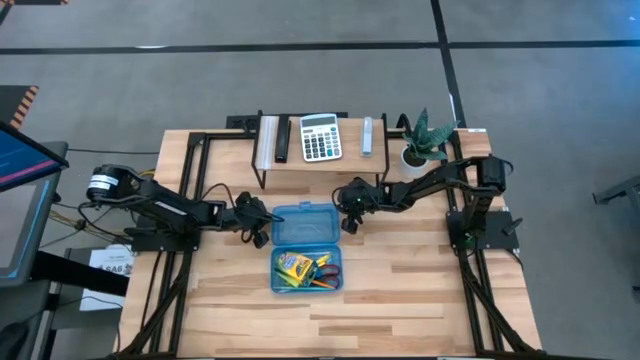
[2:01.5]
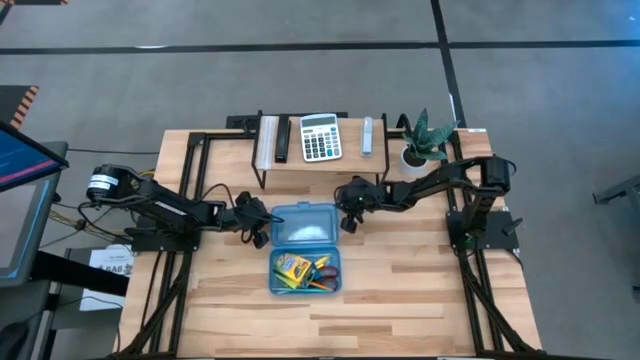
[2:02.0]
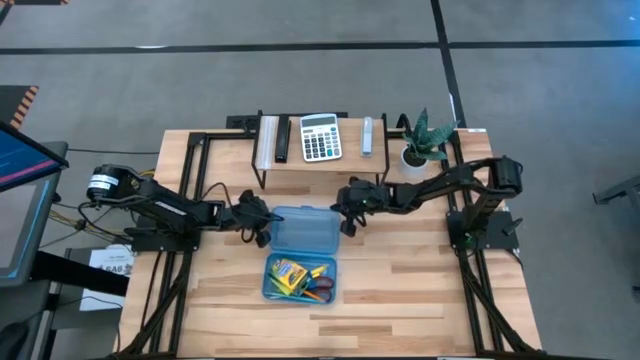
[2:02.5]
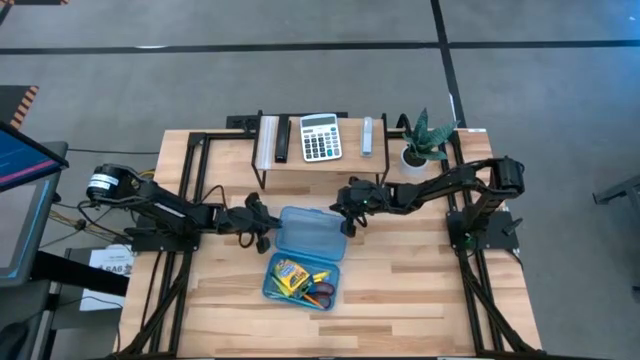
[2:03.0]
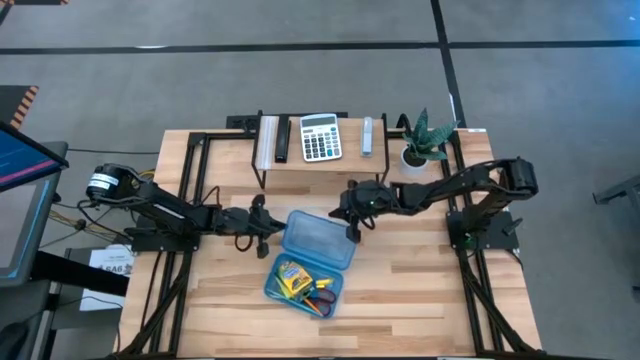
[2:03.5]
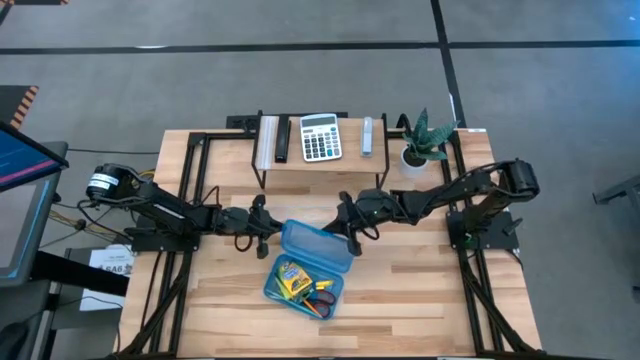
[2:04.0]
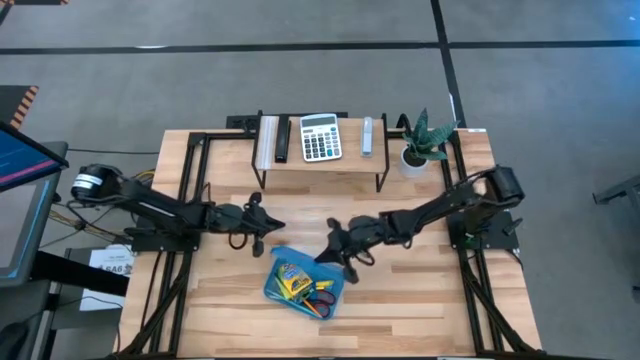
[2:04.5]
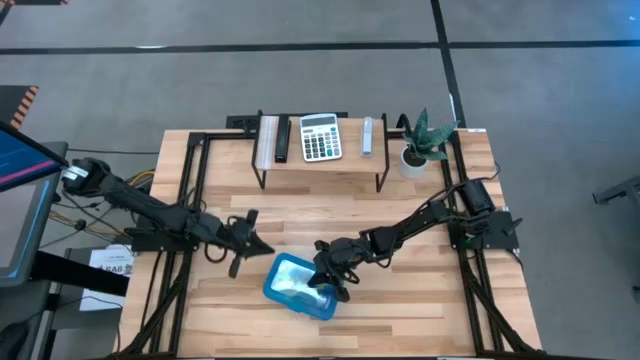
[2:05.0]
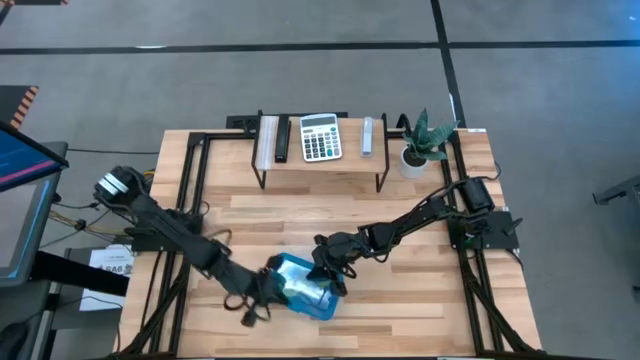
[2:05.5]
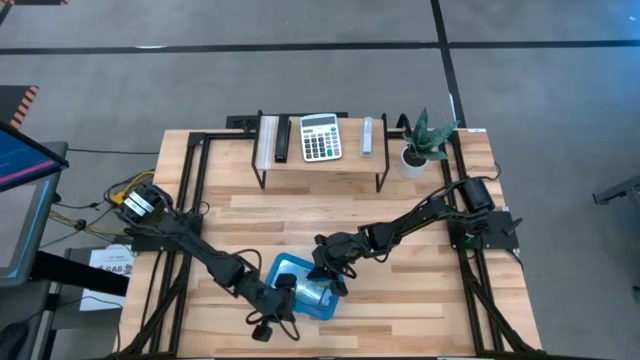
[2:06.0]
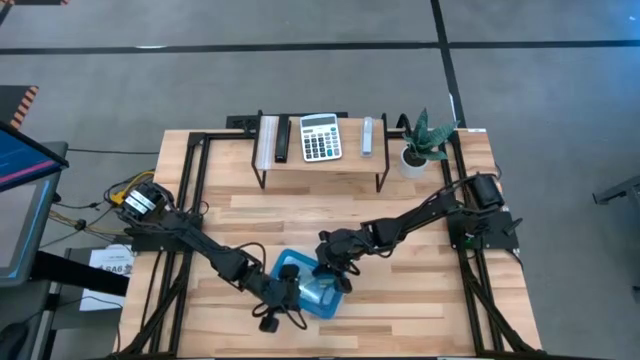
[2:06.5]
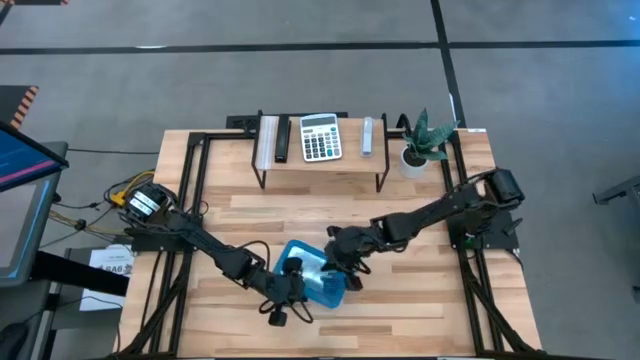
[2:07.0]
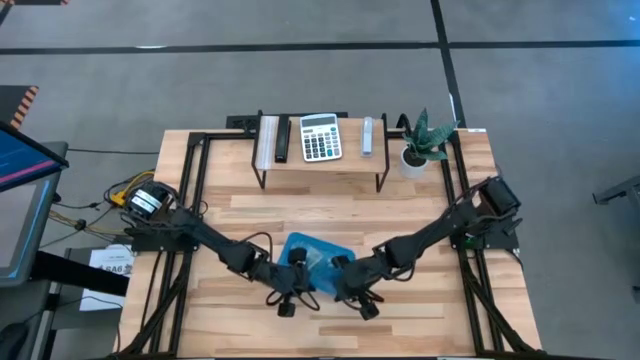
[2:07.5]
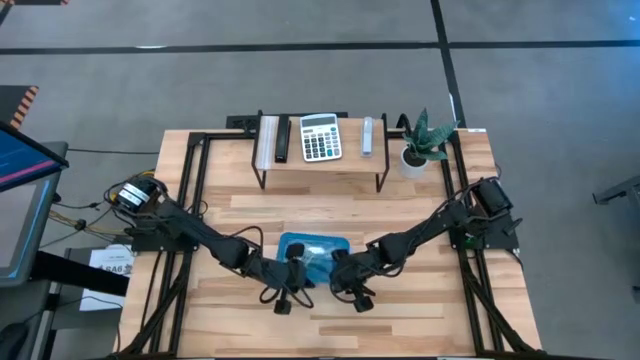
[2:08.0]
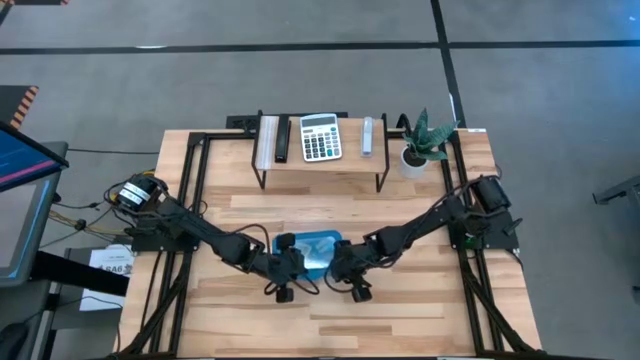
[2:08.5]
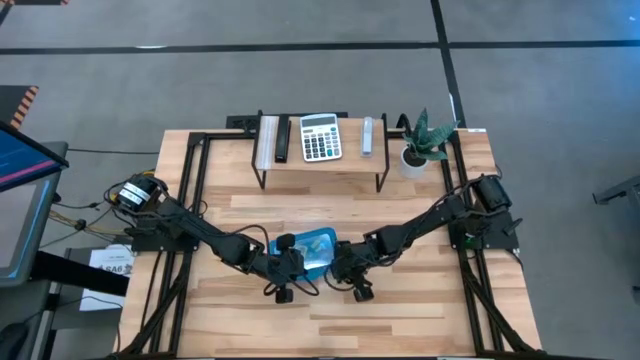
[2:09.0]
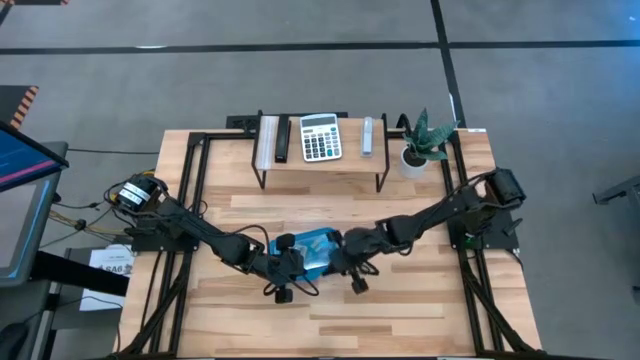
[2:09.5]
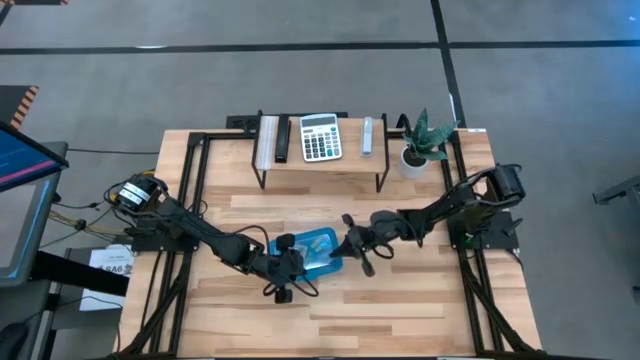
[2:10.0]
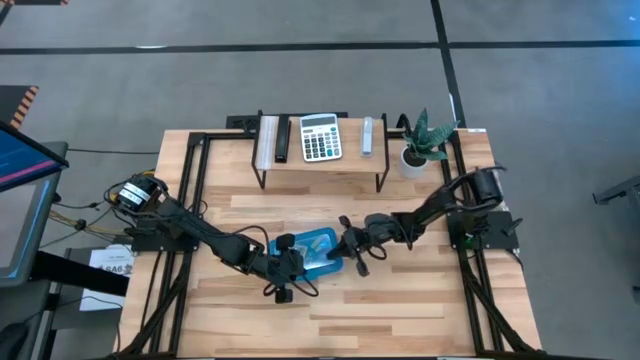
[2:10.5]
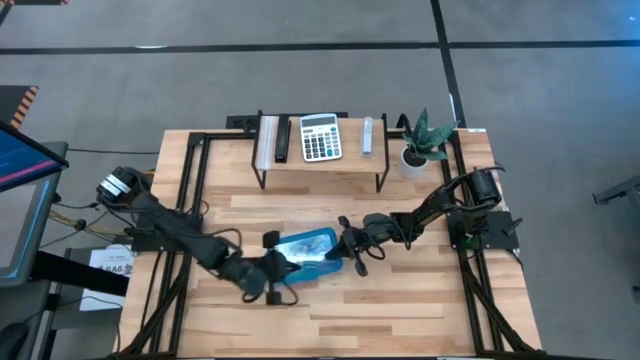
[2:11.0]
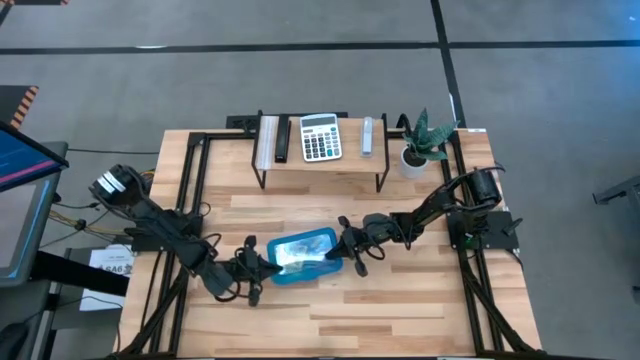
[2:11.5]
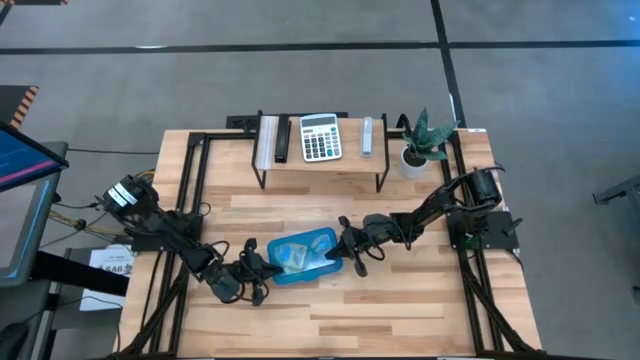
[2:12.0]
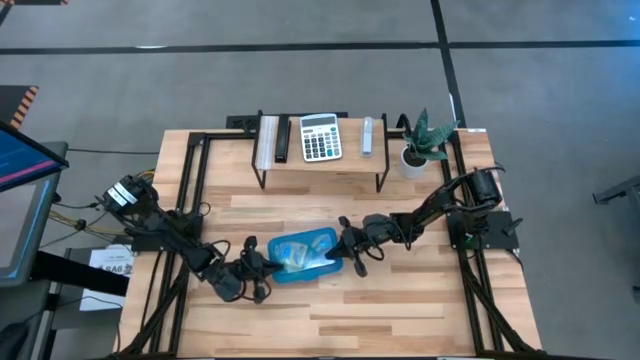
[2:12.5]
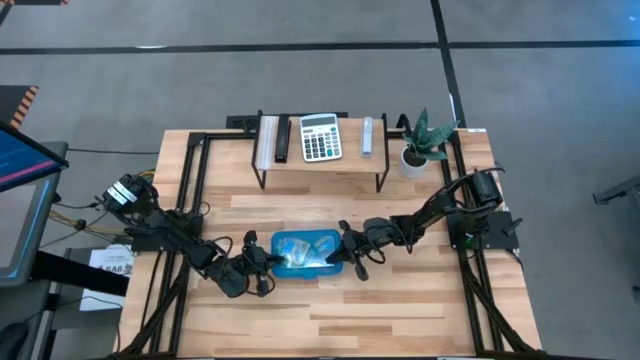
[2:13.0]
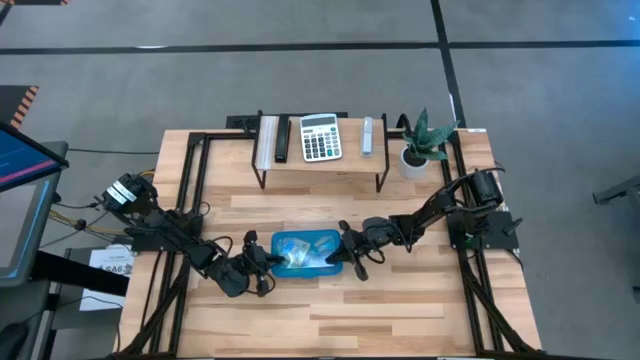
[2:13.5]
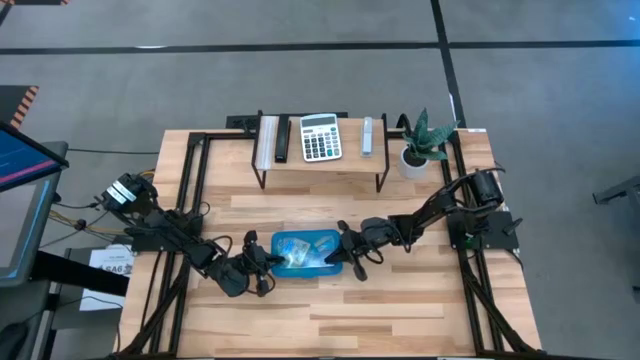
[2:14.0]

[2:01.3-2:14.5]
Task: Pack school essentials
Close the supply box

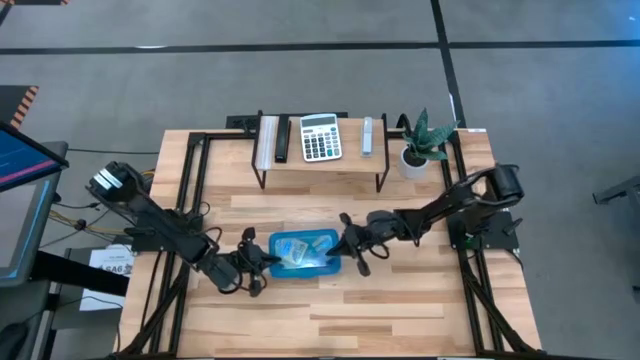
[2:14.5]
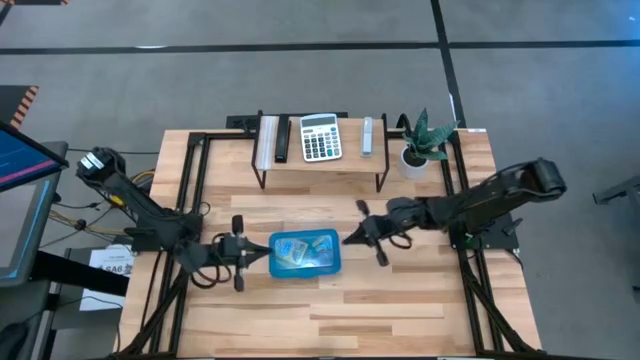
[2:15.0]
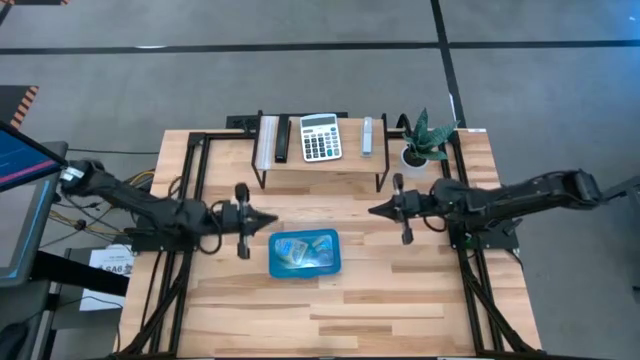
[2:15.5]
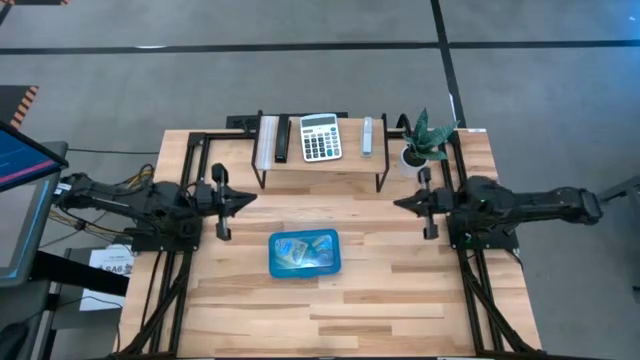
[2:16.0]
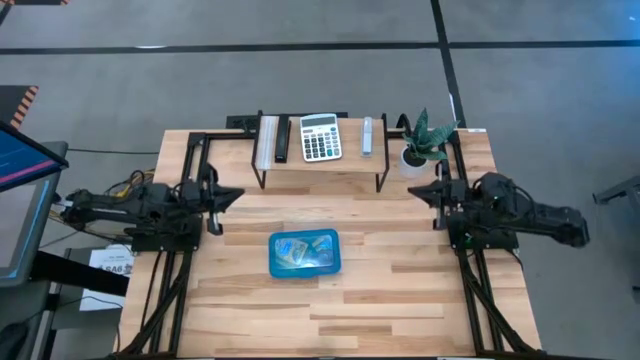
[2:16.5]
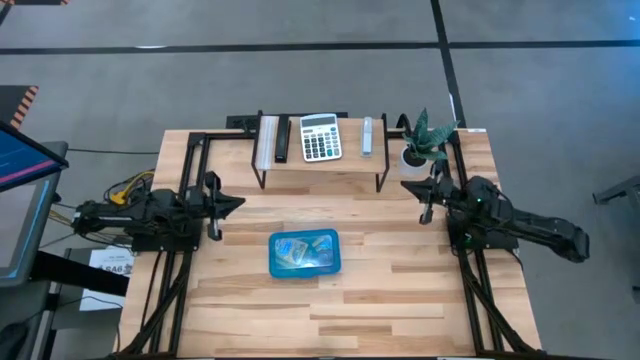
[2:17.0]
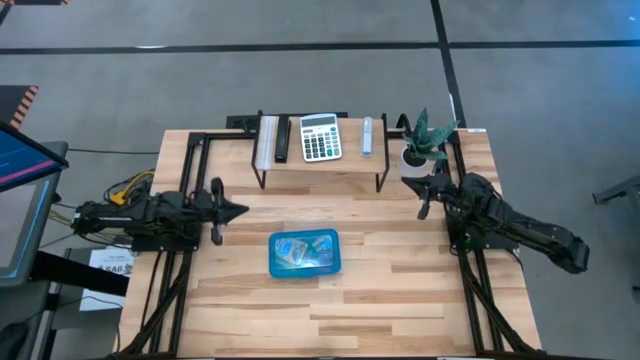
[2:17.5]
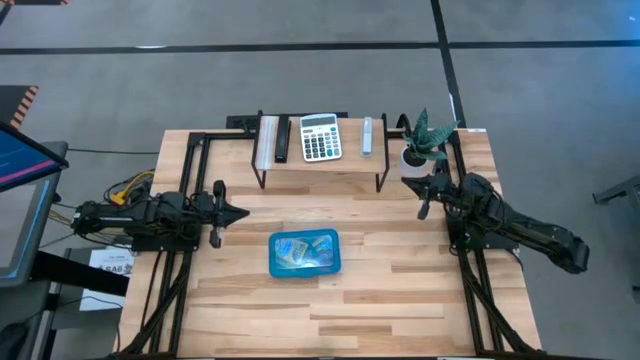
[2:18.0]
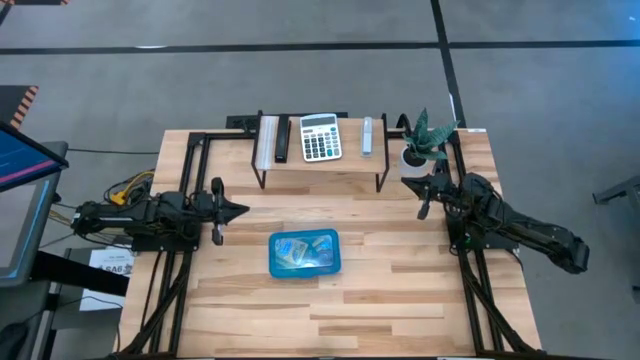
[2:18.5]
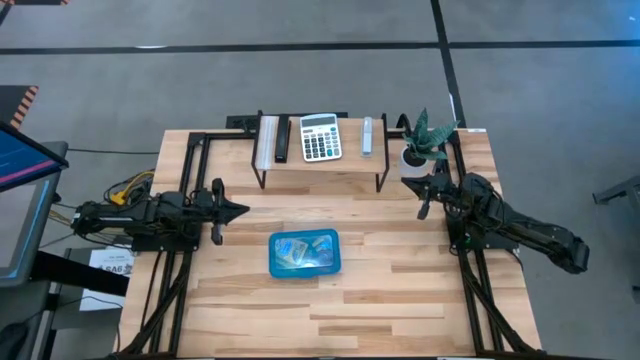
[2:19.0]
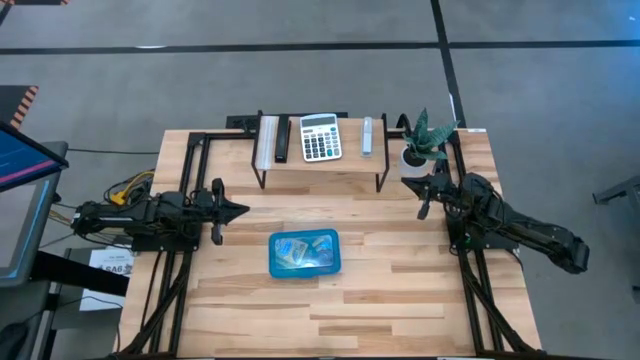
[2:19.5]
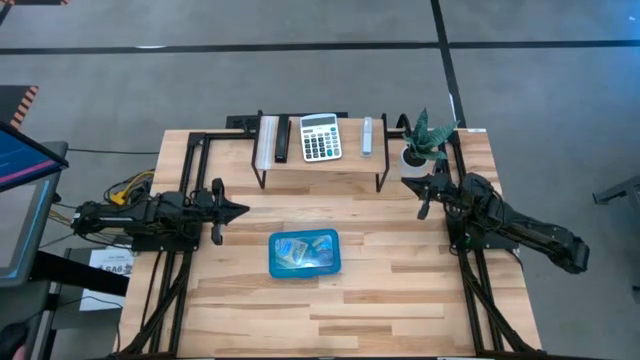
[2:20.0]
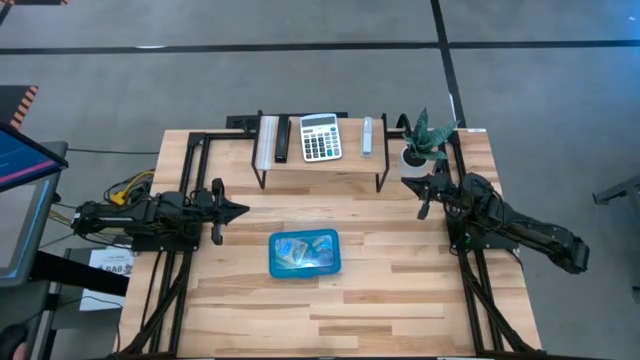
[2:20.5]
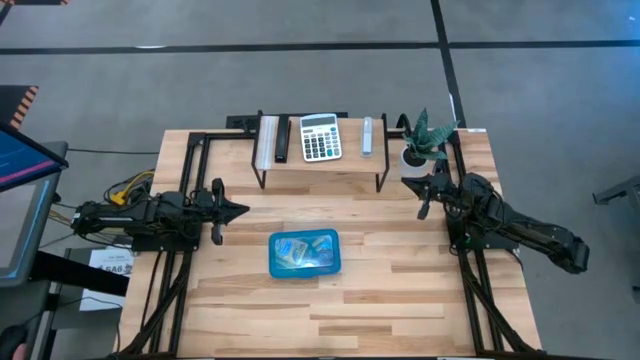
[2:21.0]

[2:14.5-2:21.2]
Return to Home Position

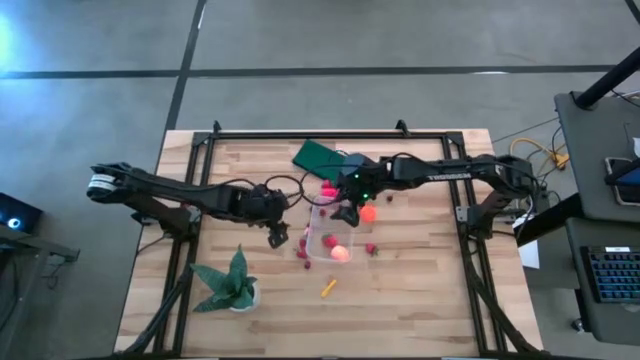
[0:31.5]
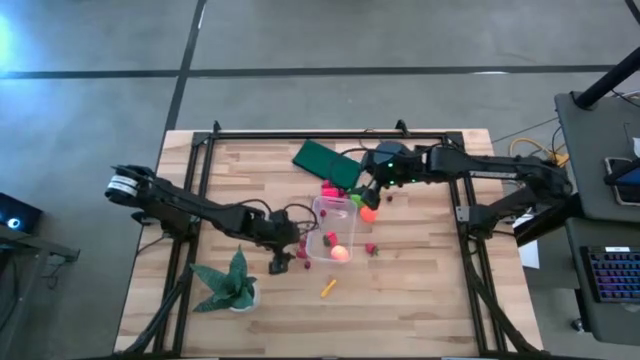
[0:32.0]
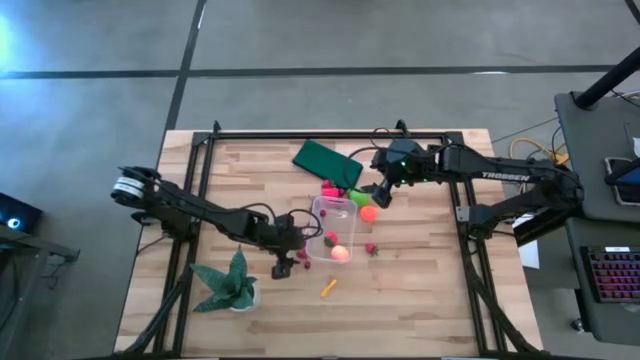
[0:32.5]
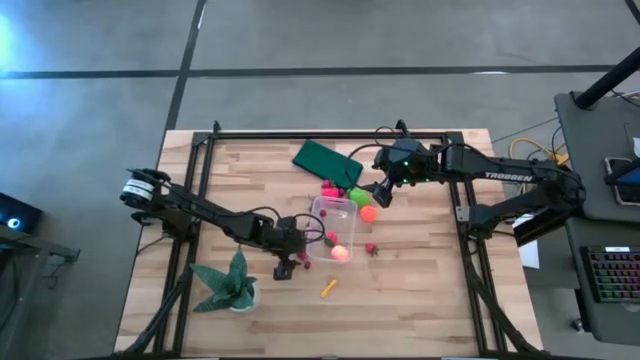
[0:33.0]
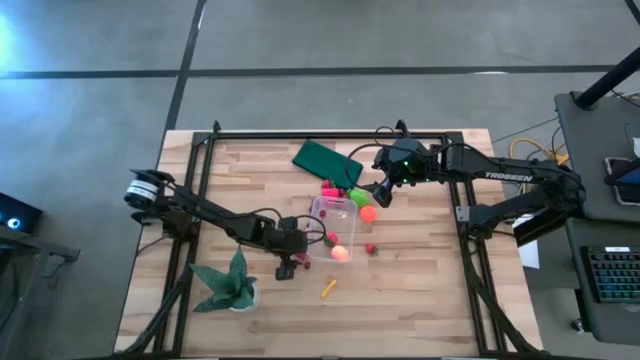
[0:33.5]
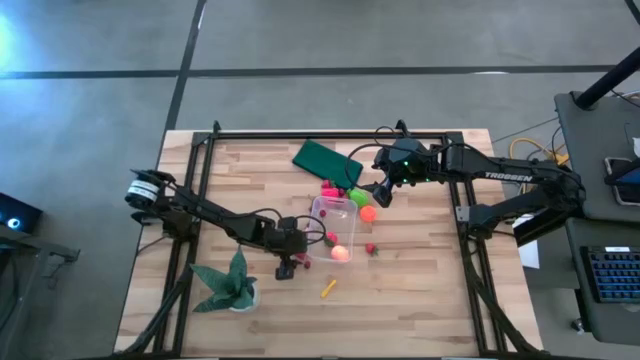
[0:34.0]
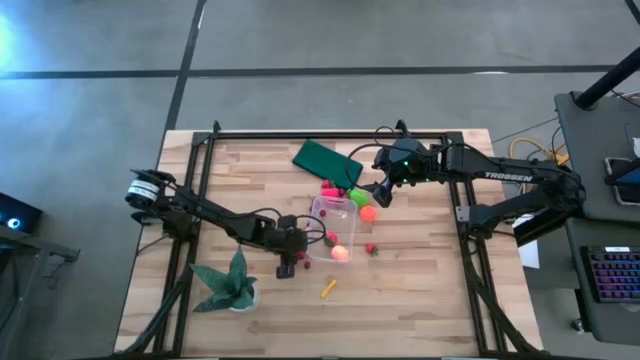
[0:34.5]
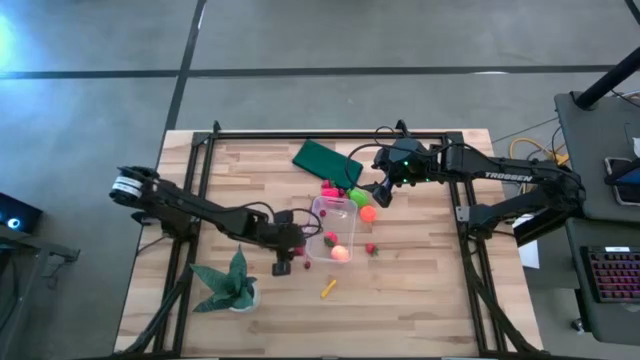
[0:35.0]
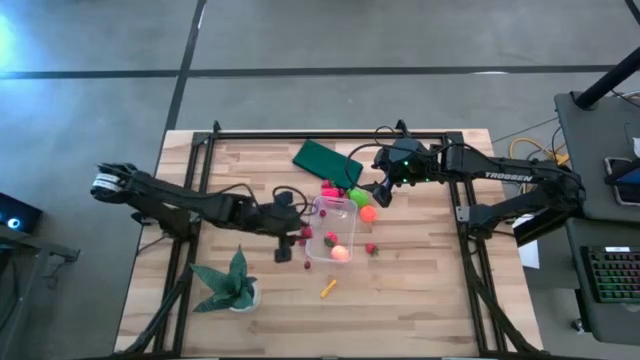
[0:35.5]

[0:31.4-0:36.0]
Task: Pick and placing Produce into tupperware
Put the red strawberry into the transparent bin
